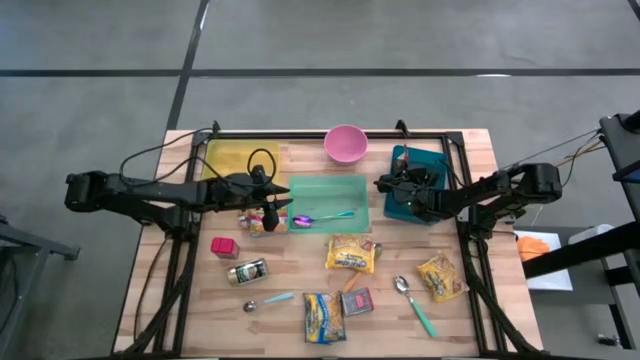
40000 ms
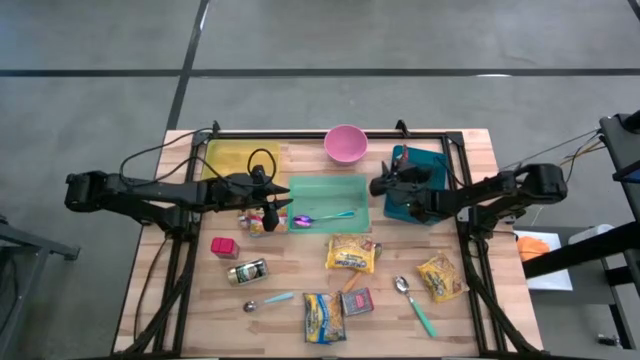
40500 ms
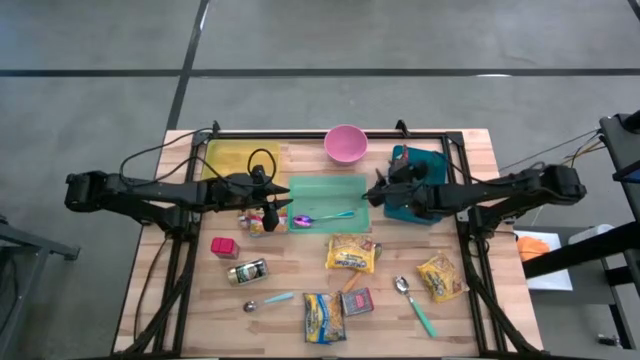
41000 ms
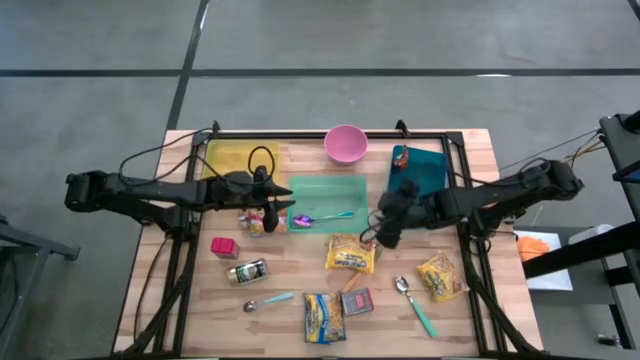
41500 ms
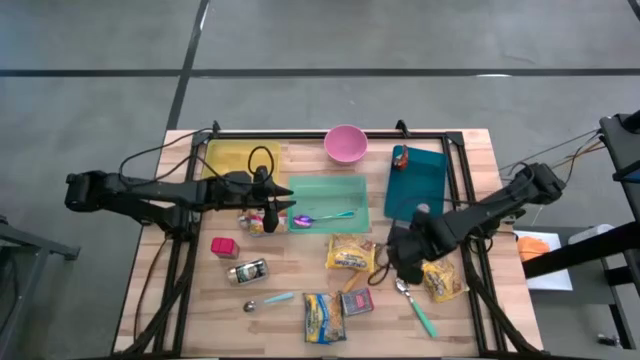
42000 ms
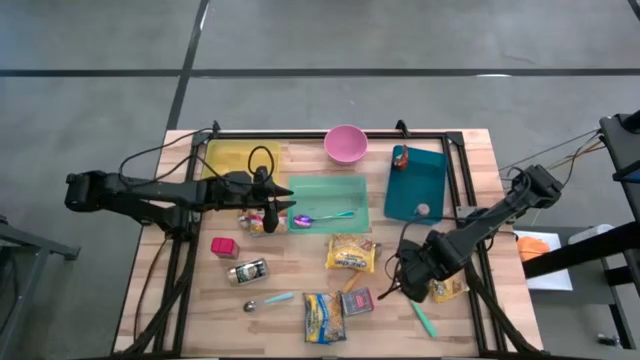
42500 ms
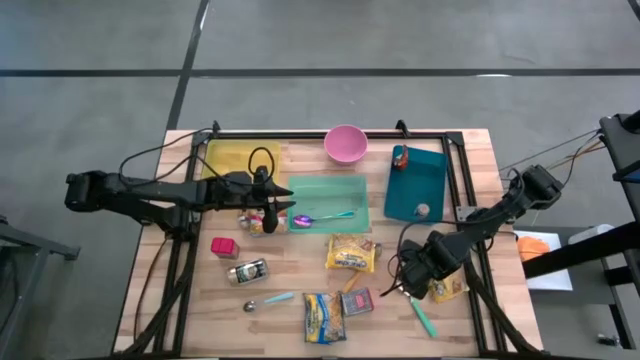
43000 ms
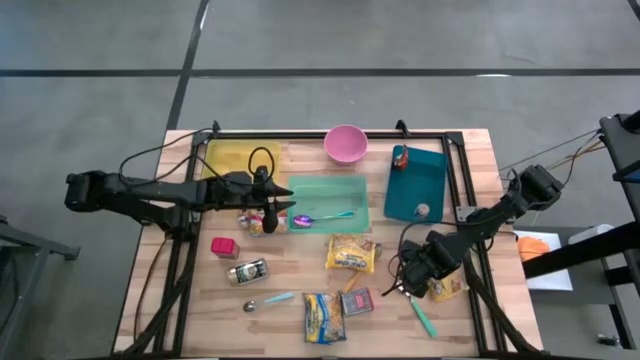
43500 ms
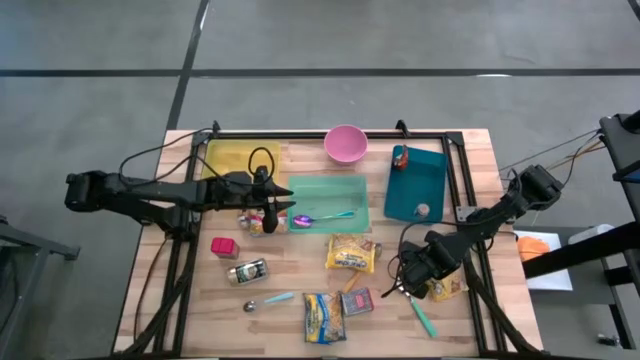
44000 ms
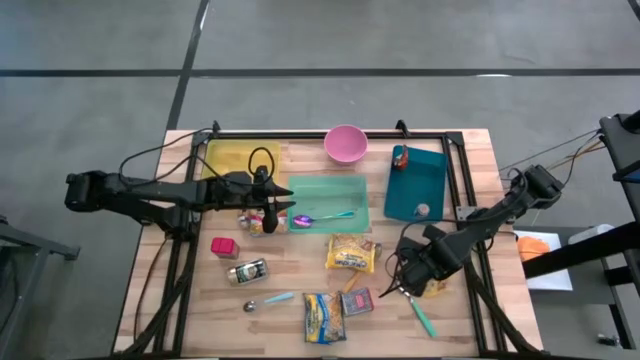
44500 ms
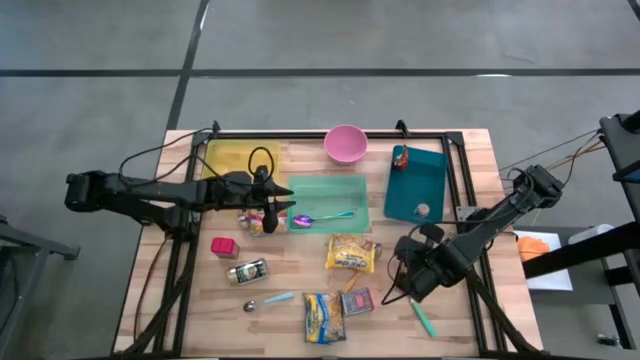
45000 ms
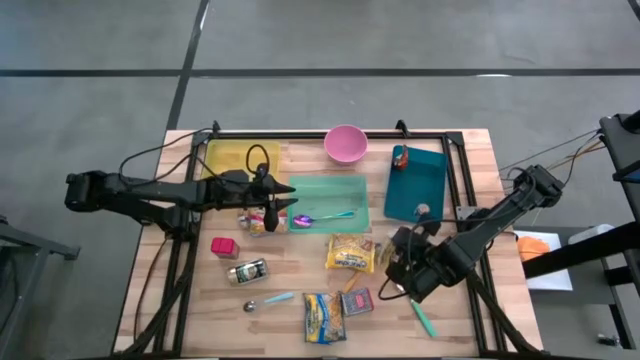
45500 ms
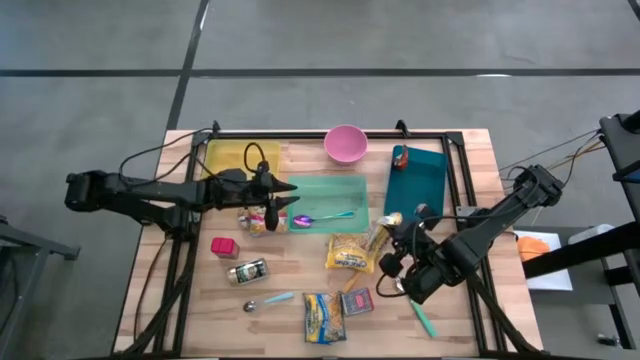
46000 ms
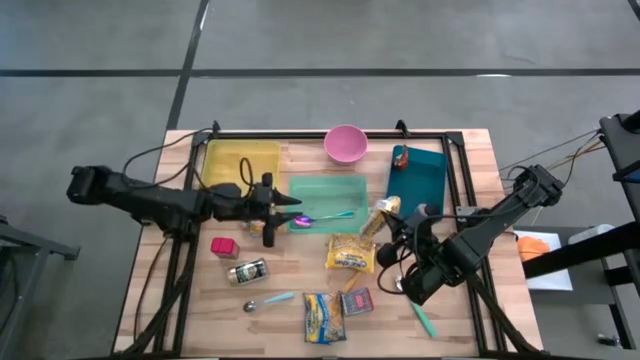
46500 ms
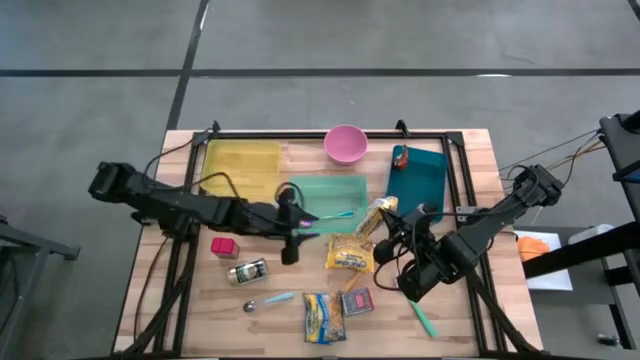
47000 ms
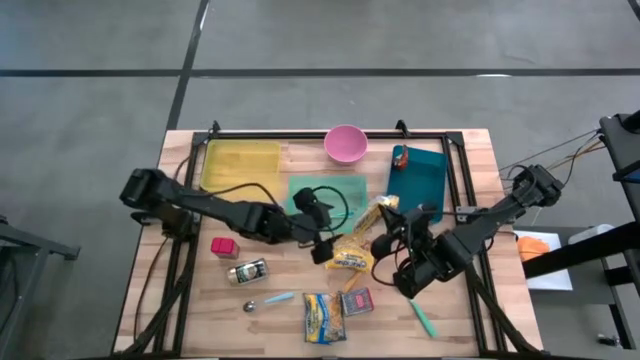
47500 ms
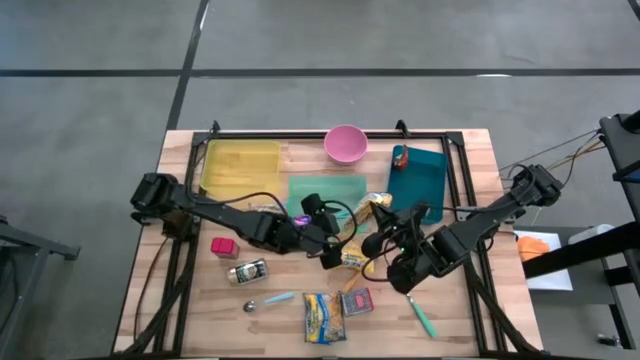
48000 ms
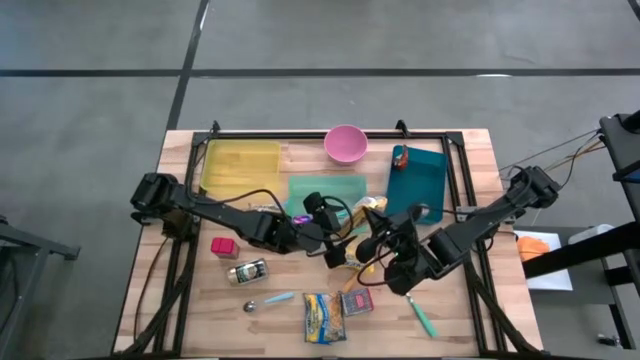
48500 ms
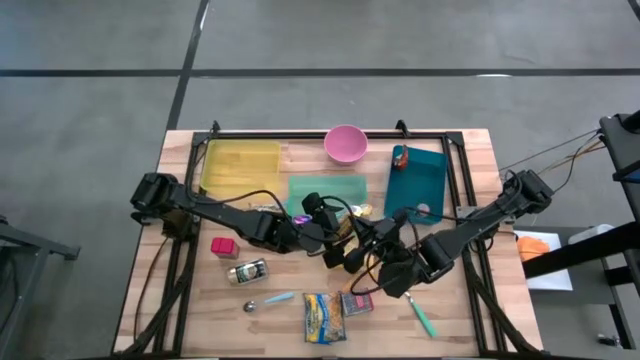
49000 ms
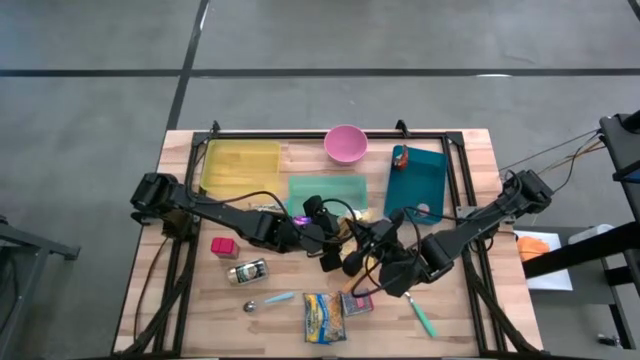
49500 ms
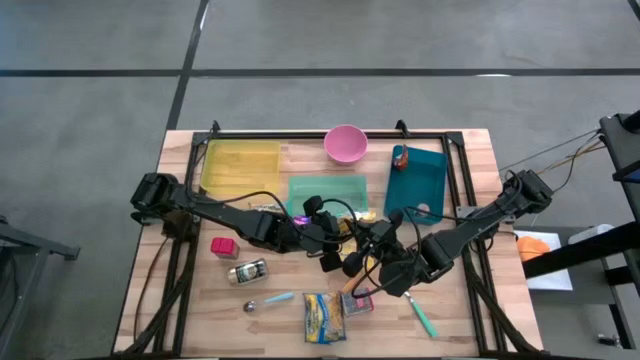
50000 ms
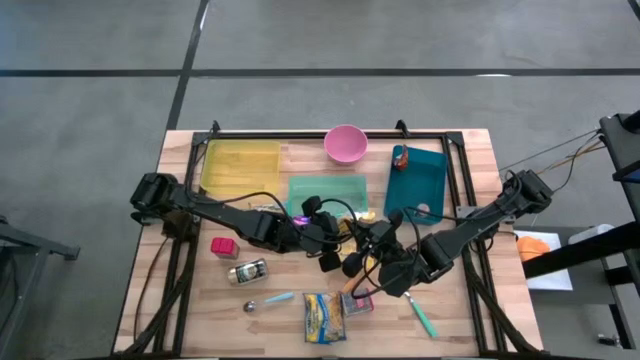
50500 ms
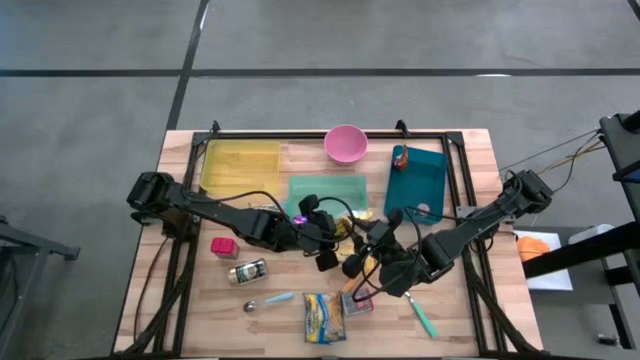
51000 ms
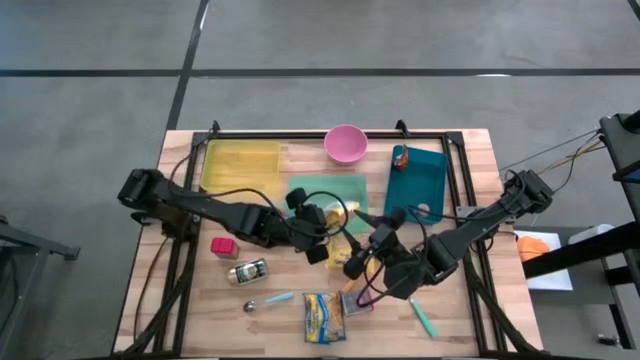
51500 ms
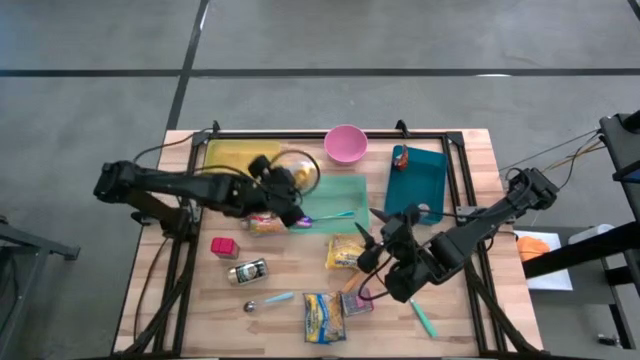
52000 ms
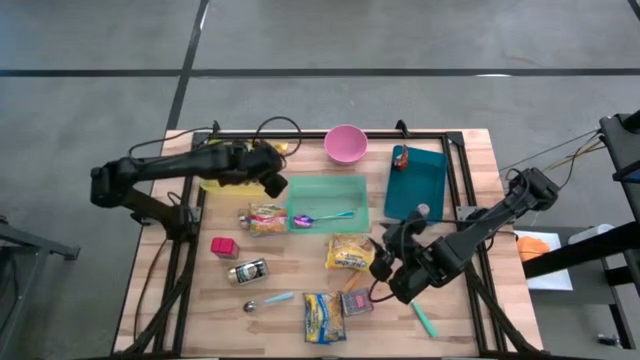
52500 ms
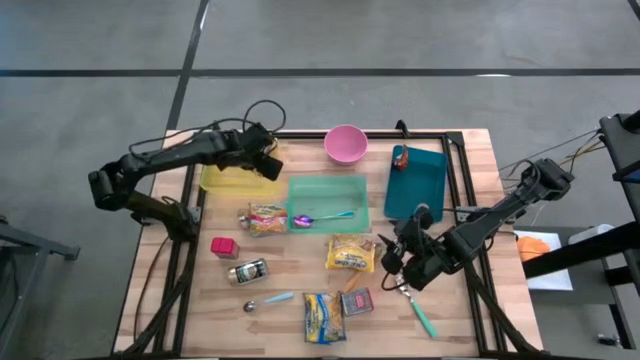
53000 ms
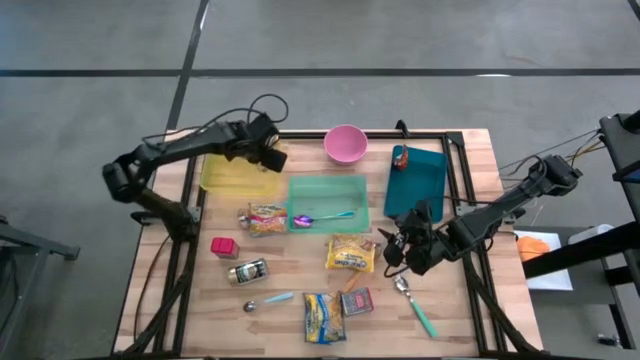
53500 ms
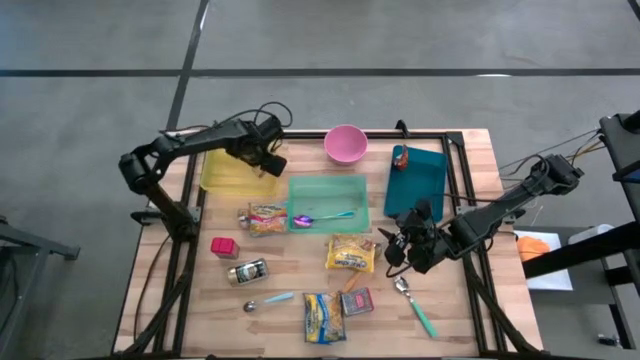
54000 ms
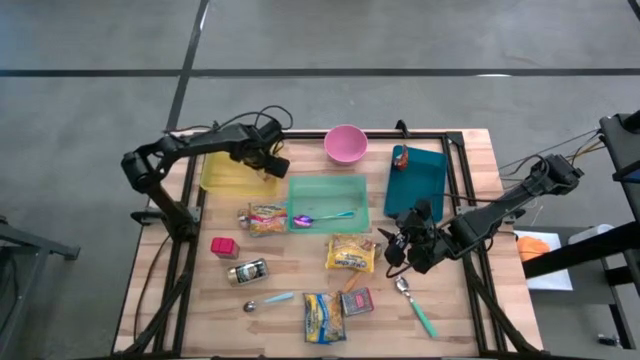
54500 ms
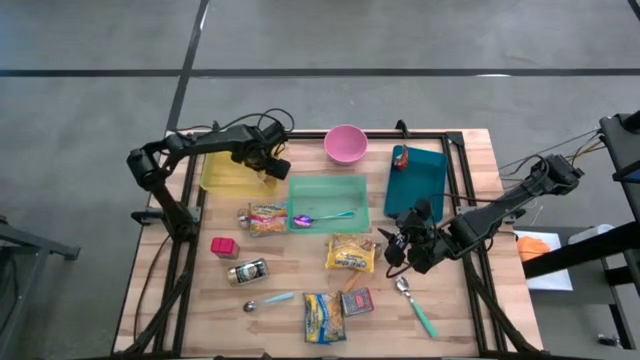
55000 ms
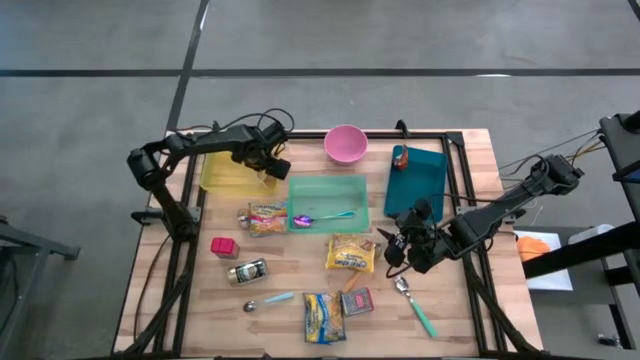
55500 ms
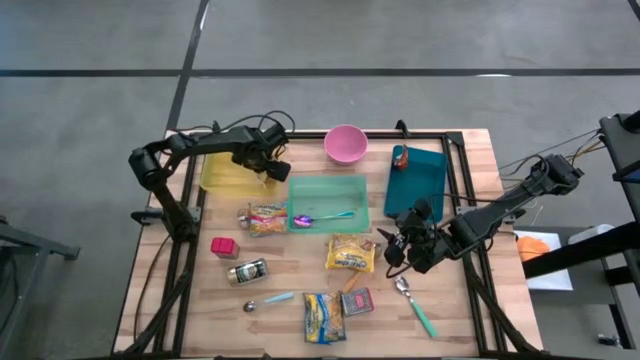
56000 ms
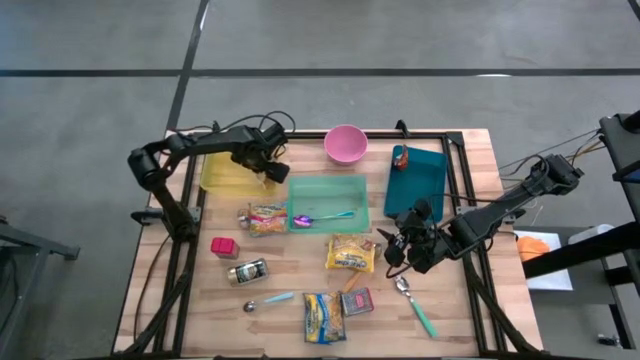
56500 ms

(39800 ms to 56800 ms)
Put the right yellow noodle pack into the yellow bin

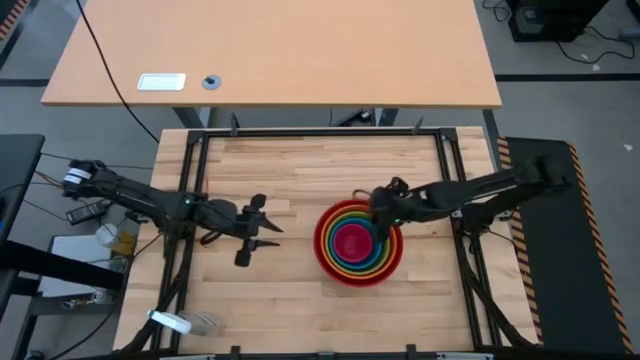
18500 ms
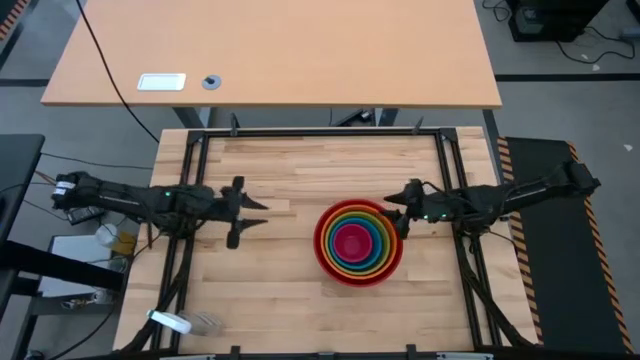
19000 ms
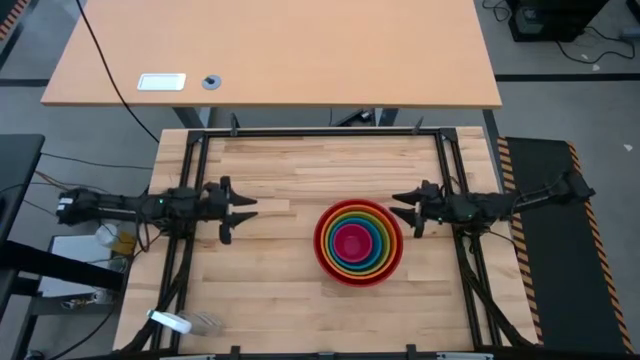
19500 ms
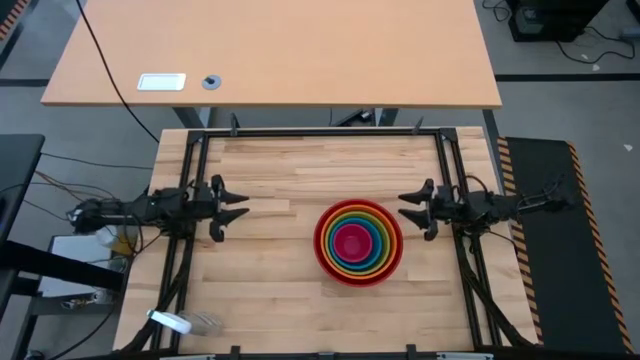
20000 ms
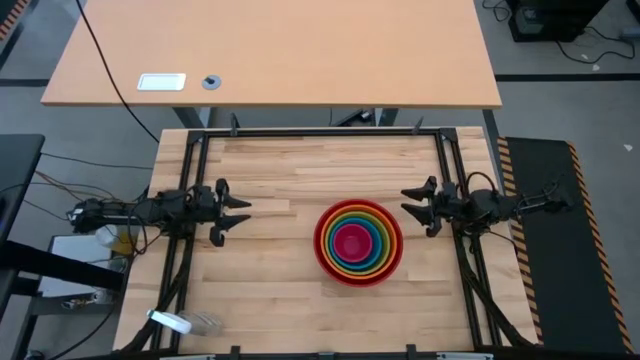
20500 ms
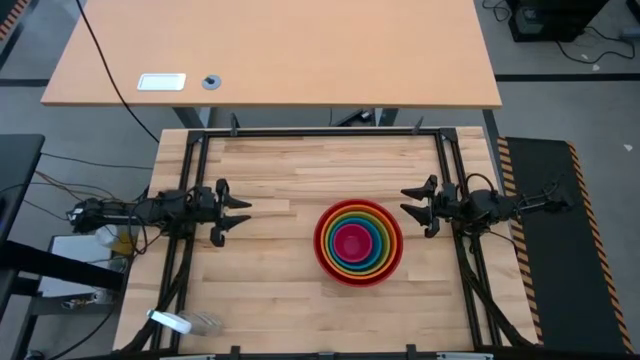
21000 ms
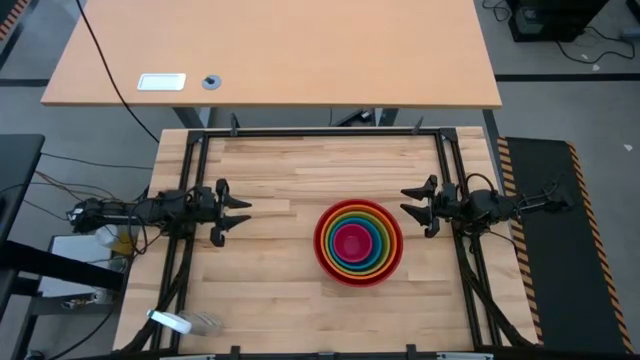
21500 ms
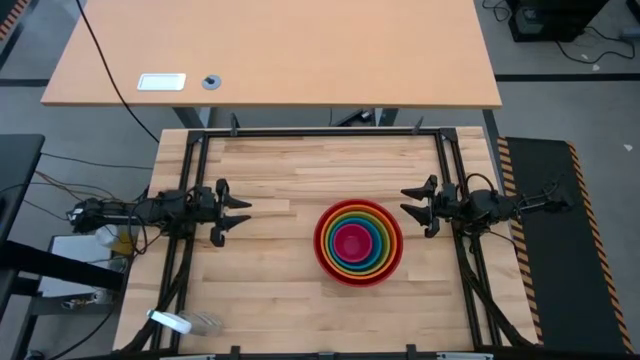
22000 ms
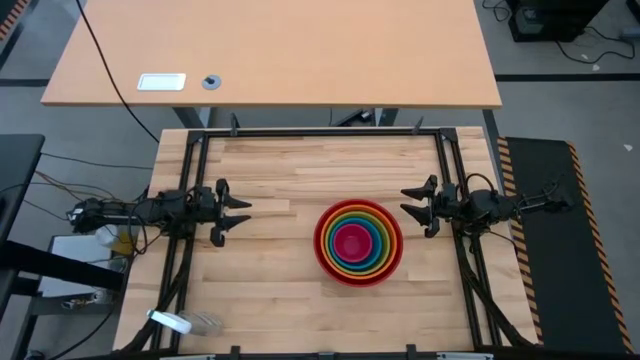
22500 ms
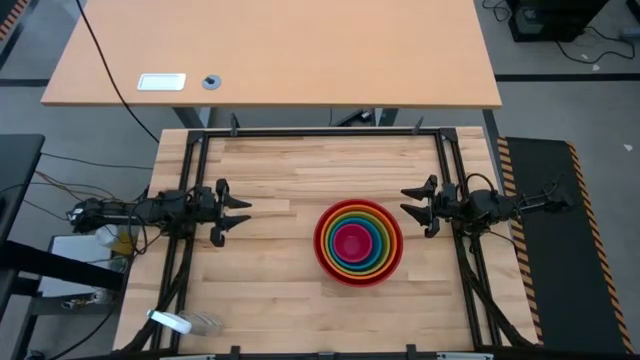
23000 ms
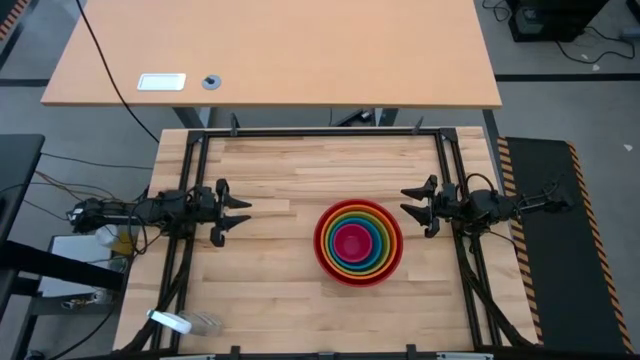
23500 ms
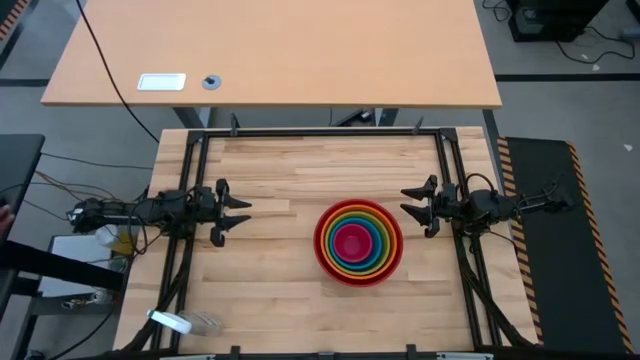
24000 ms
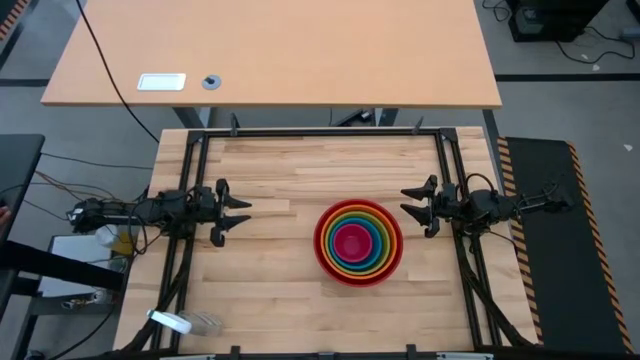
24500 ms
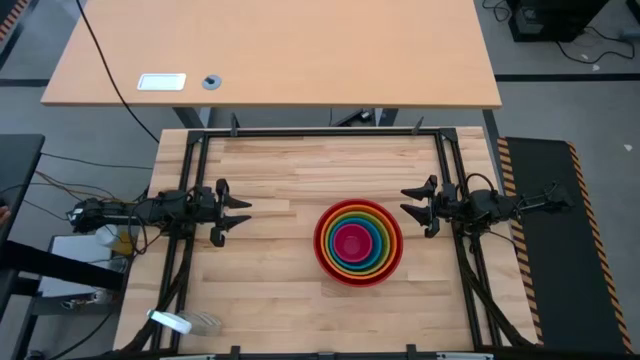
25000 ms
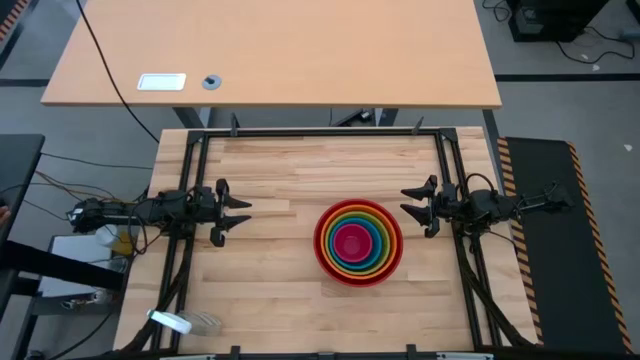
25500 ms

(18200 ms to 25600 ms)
Return to Home Position
